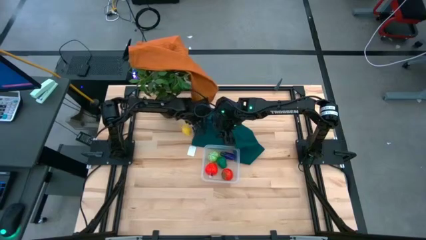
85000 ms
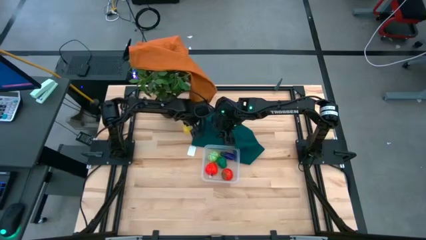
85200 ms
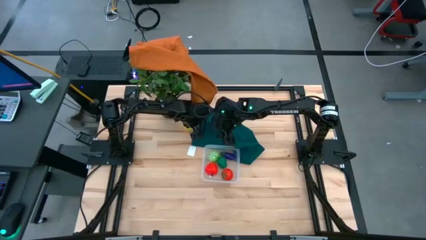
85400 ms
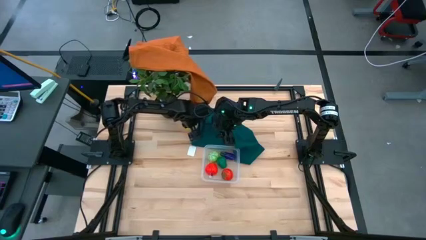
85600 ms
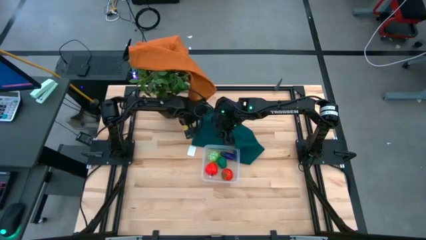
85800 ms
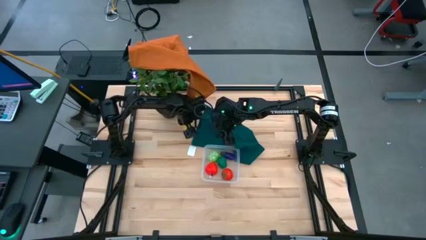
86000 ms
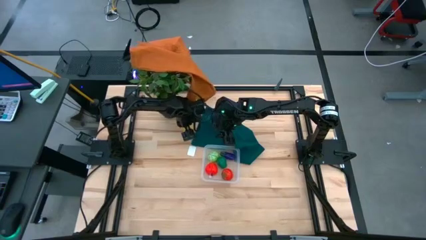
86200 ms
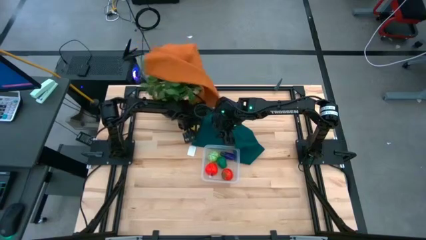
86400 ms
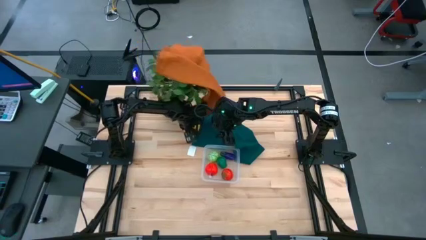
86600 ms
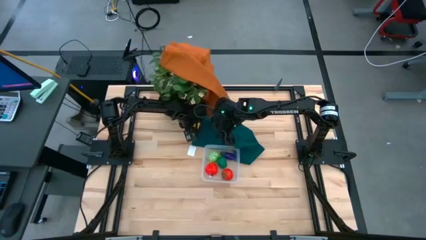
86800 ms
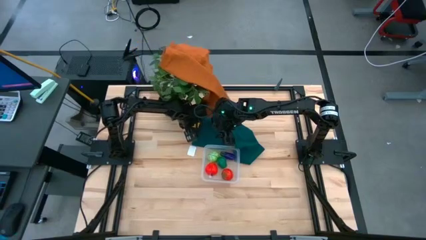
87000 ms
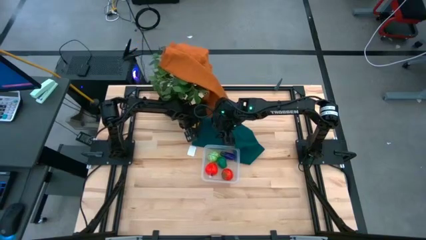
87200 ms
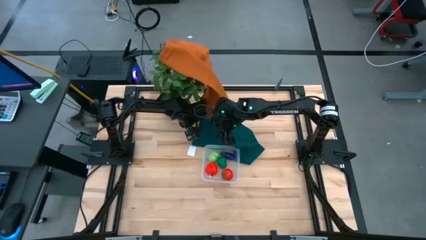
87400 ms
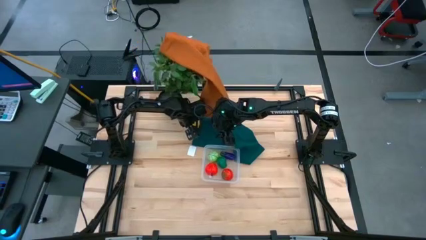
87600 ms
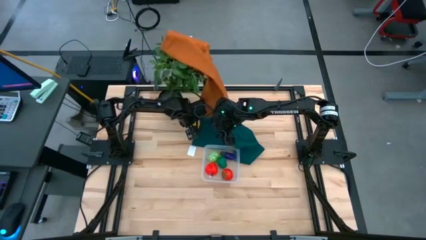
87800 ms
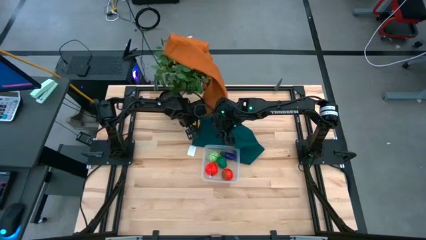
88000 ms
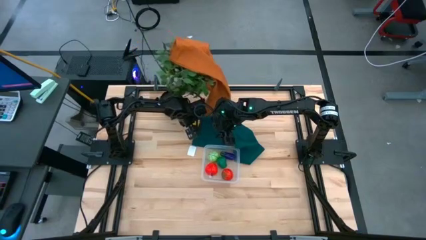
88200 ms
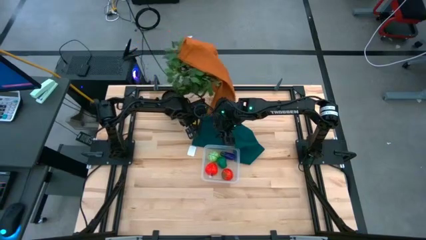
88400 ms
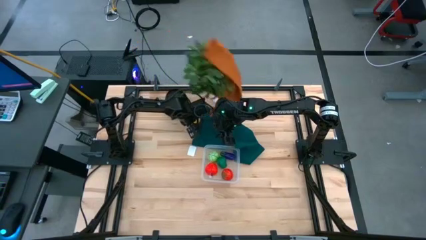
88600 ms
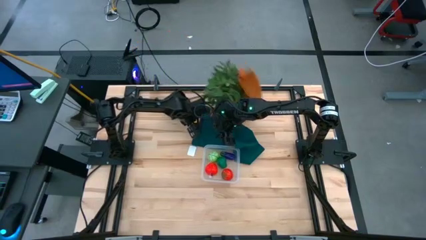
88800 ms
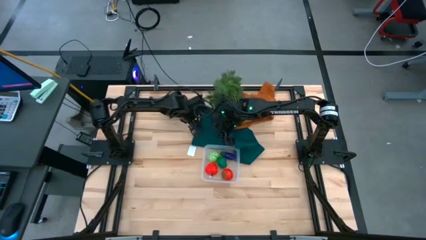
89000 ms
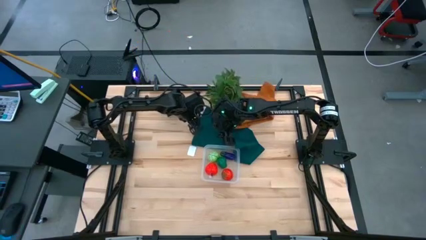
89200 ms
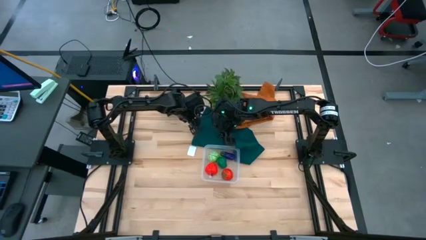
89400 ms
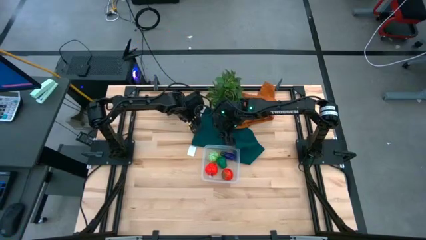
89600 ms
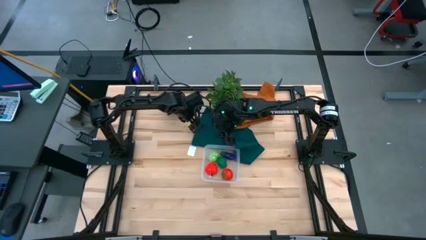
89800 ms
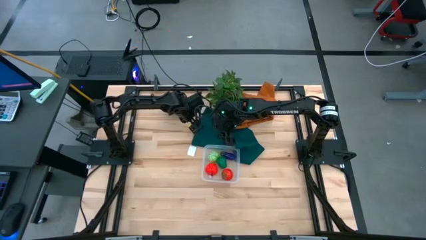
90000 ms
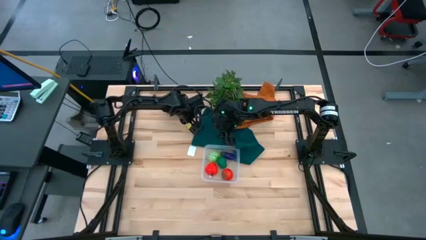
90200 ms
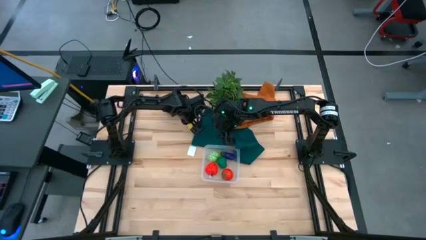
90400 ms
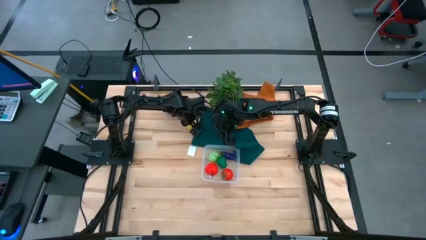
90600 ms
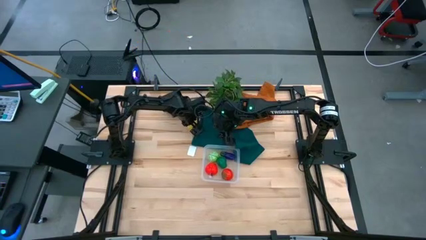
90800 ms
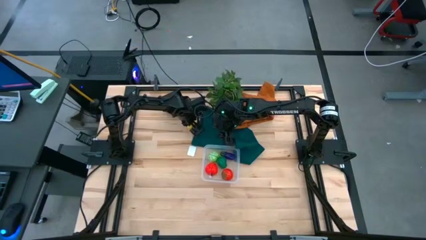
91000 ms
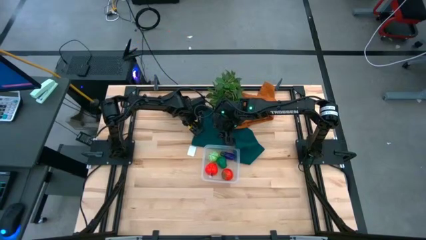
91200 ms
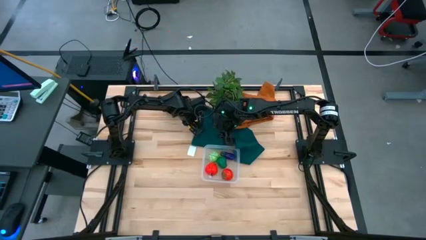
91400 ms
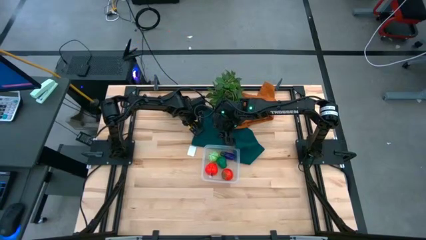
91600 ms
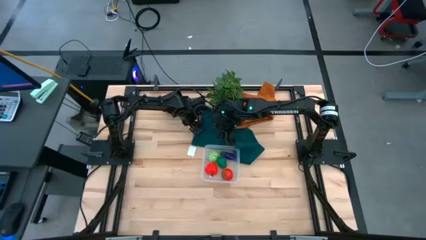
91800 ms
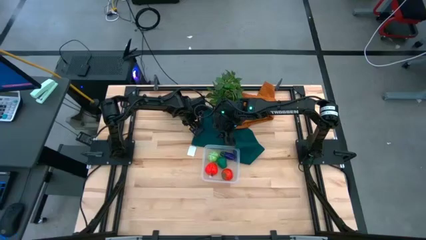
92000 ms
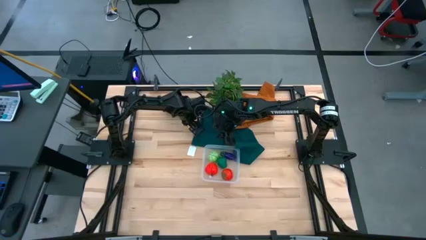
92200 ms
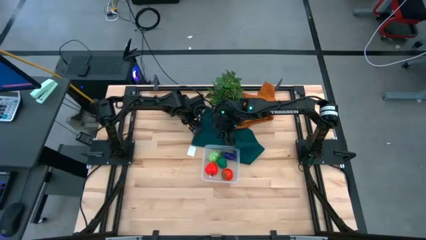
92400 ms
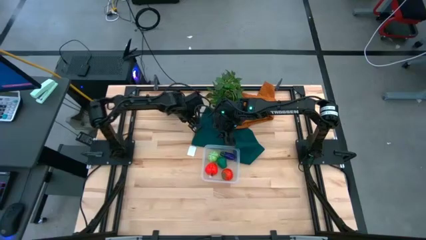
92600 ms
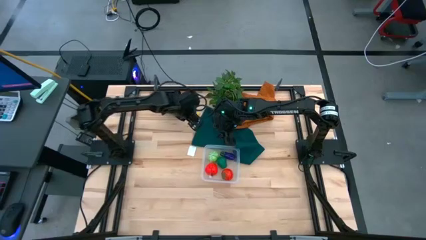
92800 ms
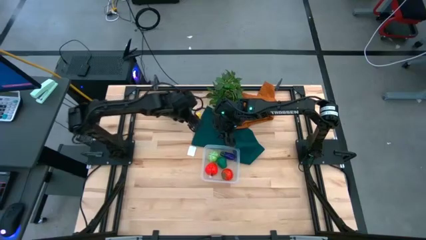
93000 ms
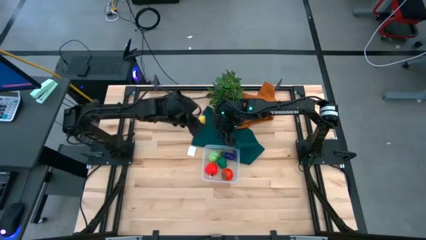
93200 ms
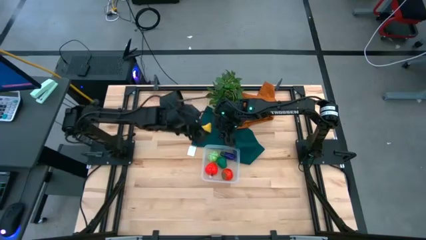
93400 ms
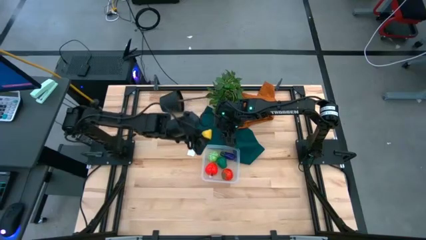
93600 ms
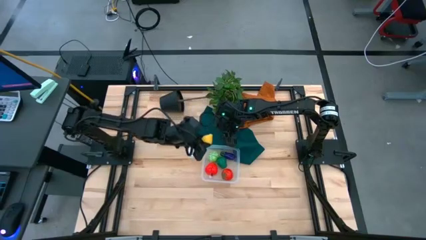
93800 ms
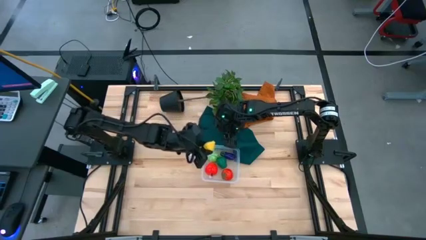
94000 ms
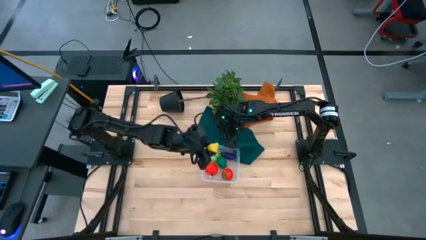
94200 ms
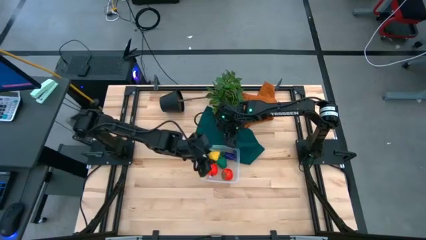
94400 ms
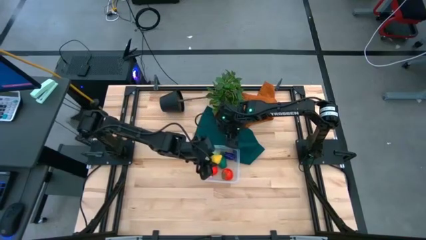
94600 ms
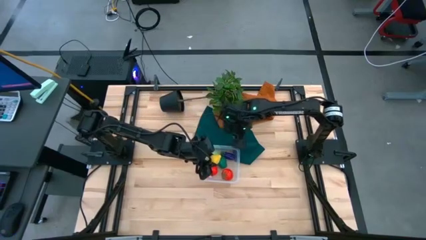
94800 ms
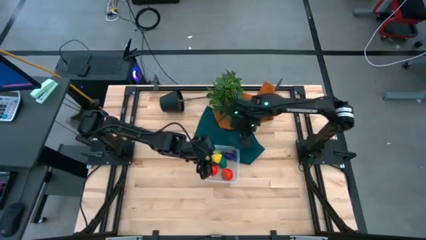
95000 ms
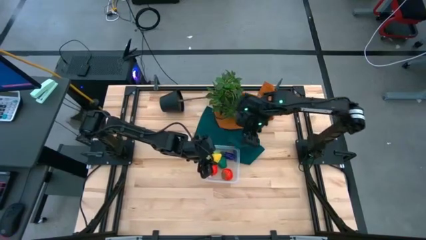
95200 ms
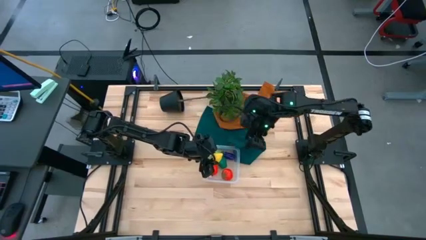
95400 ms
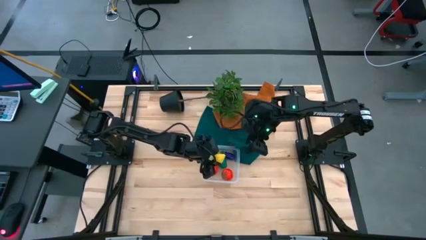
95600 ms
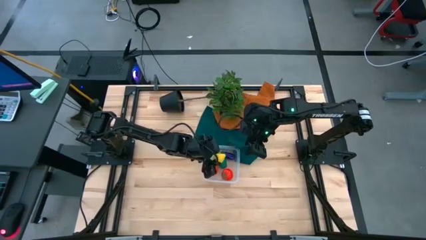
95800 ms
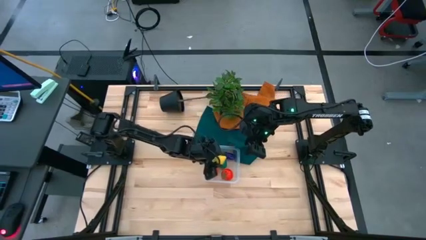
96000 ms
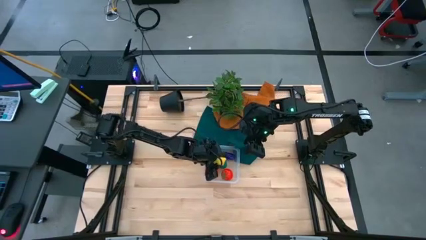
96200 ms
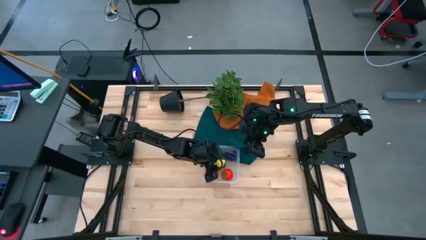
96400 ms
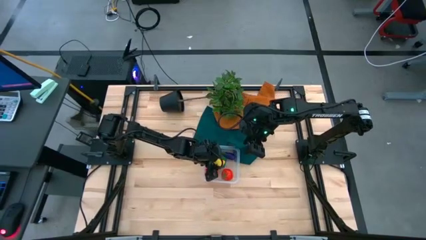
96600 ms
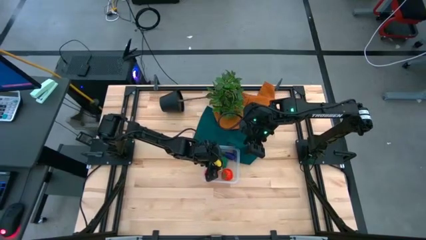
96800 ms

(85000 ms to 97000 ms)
Task: Pick and placing Produce into tupperware
Put the lemon into the transparent basket
